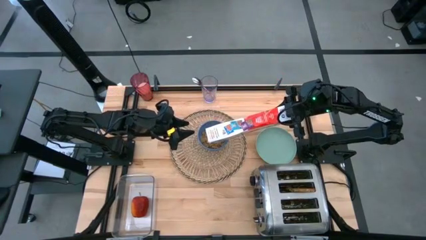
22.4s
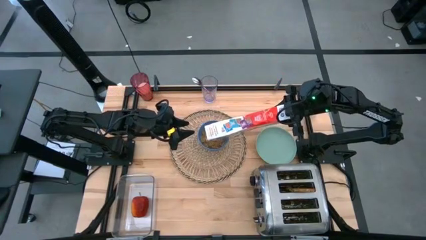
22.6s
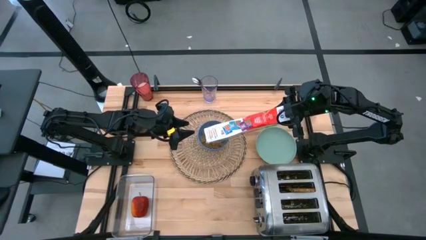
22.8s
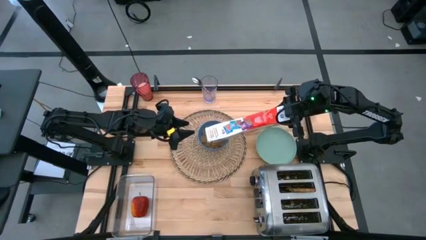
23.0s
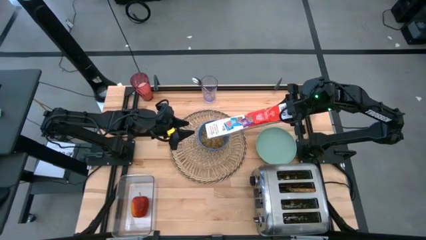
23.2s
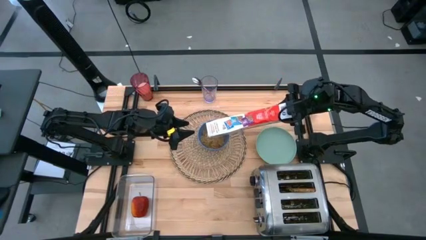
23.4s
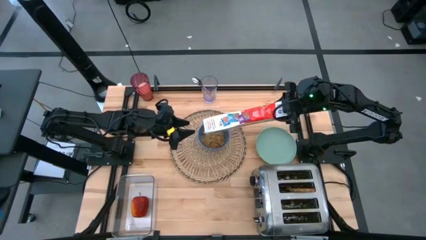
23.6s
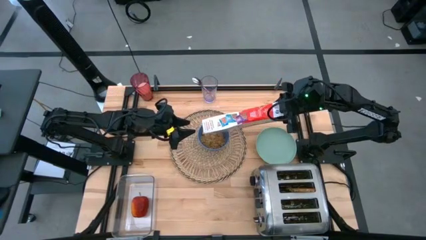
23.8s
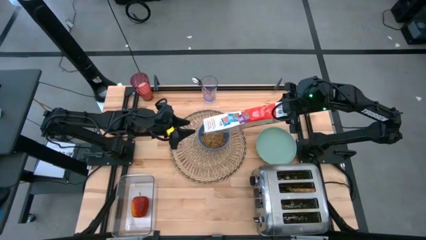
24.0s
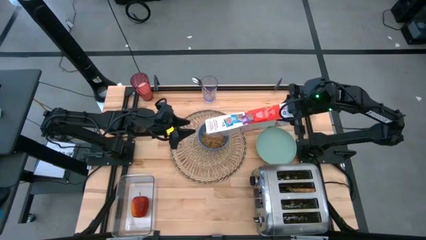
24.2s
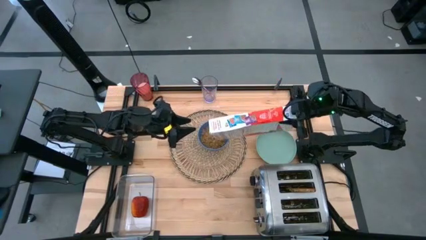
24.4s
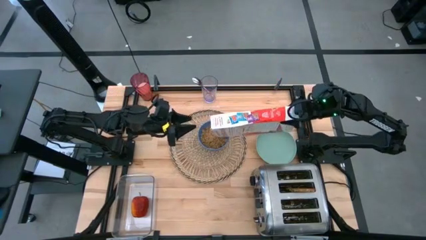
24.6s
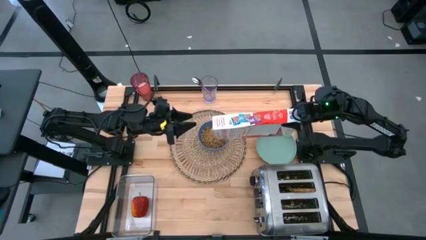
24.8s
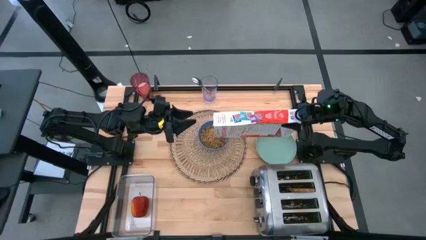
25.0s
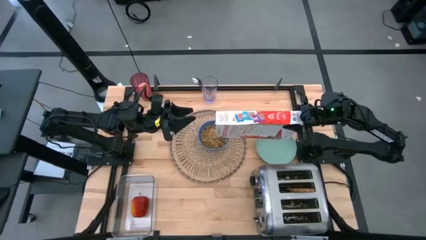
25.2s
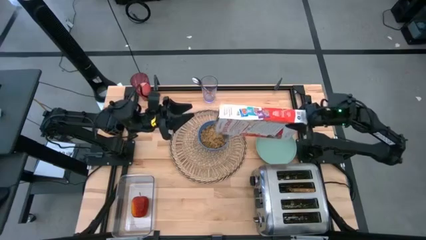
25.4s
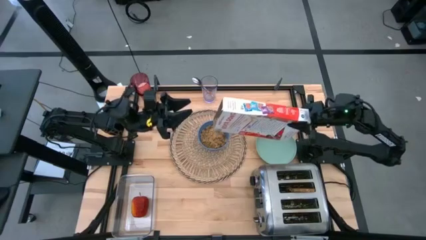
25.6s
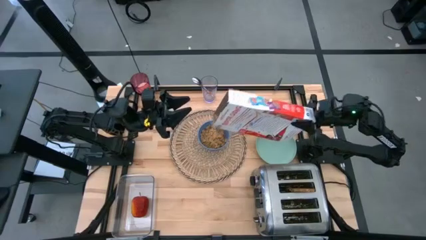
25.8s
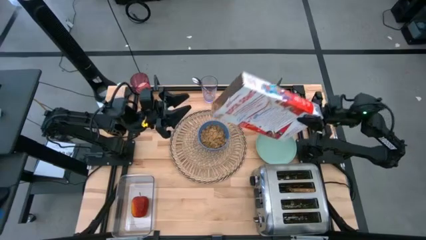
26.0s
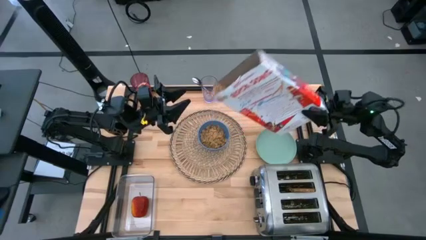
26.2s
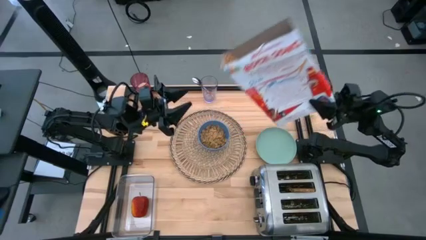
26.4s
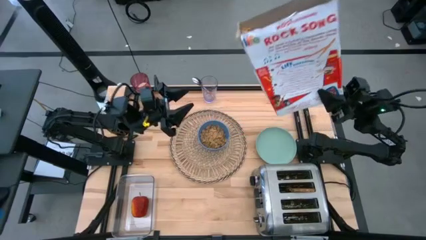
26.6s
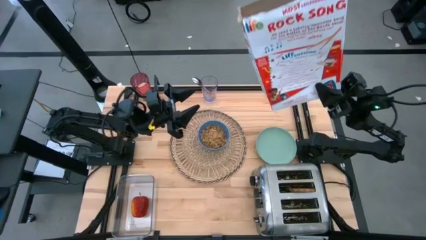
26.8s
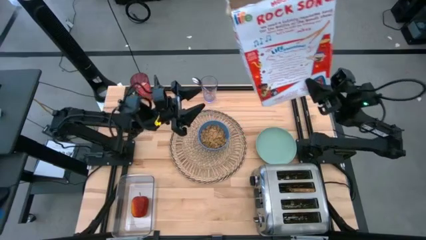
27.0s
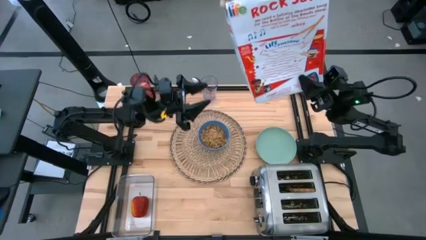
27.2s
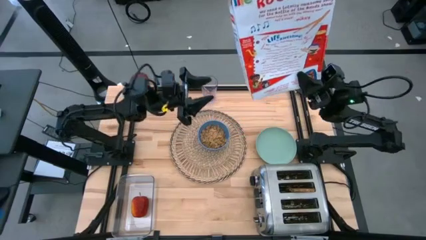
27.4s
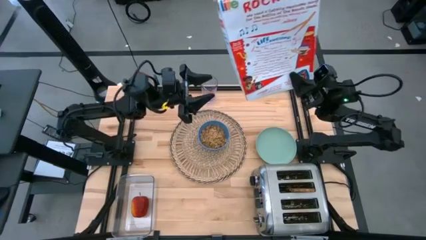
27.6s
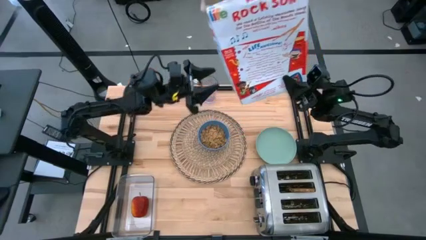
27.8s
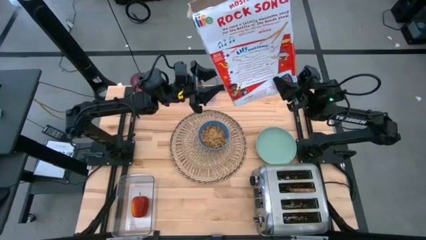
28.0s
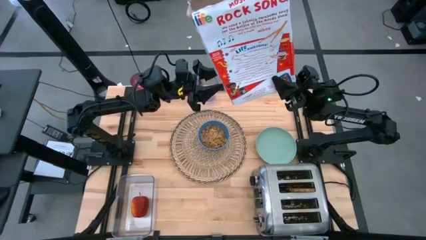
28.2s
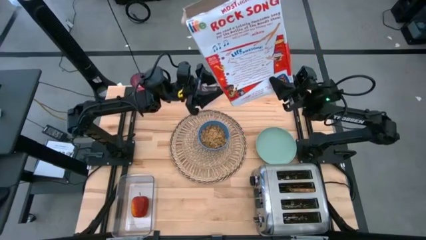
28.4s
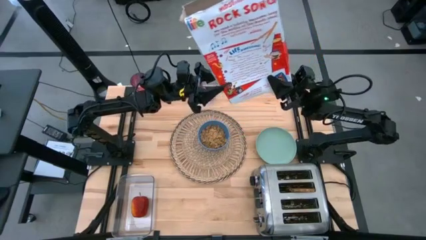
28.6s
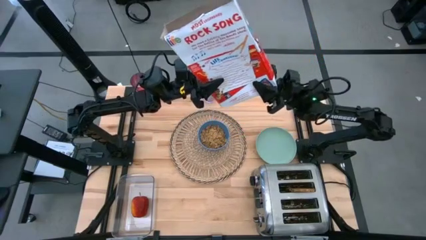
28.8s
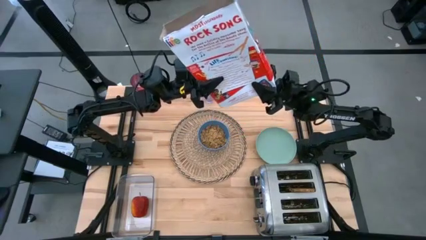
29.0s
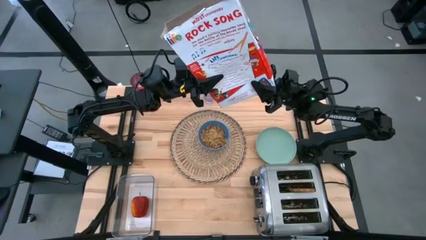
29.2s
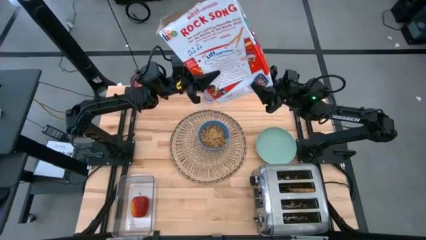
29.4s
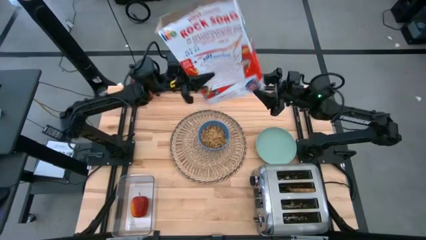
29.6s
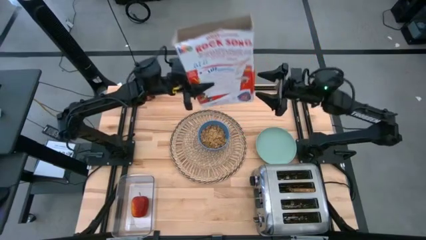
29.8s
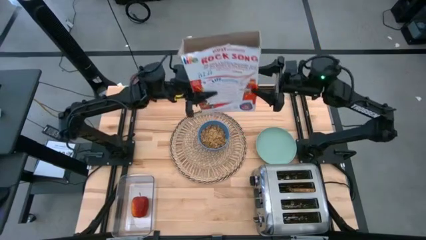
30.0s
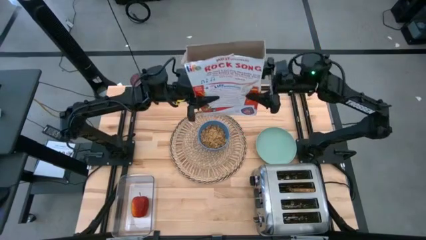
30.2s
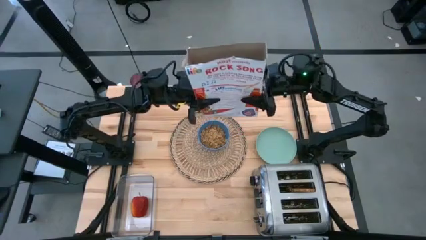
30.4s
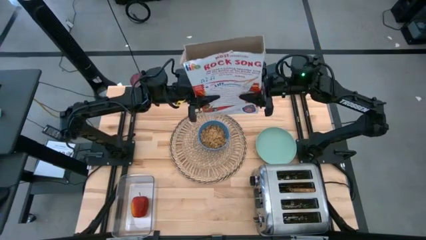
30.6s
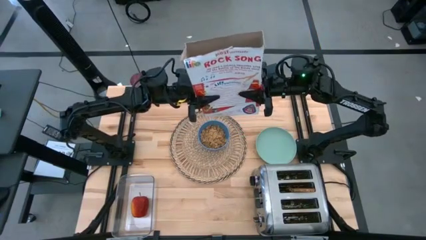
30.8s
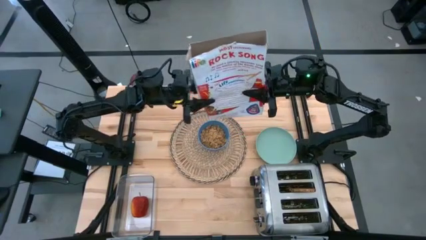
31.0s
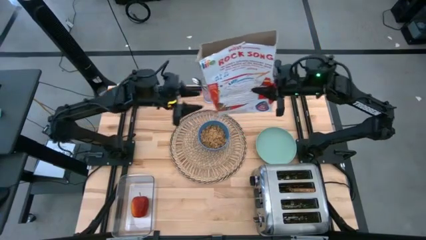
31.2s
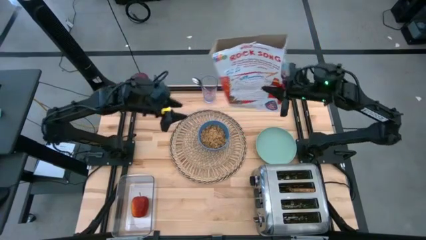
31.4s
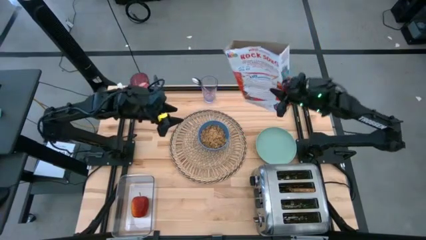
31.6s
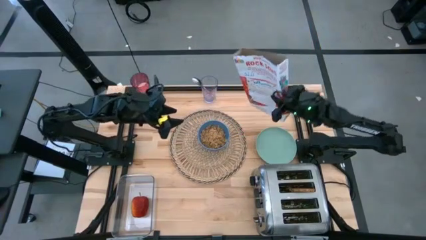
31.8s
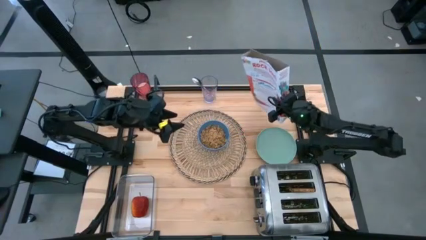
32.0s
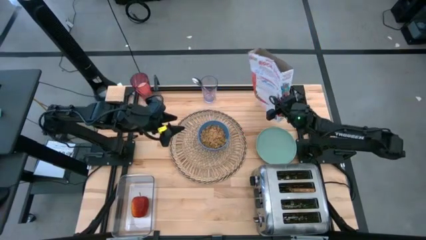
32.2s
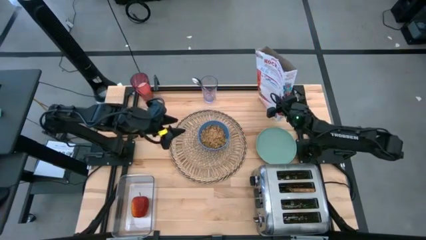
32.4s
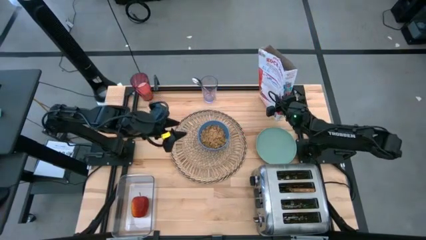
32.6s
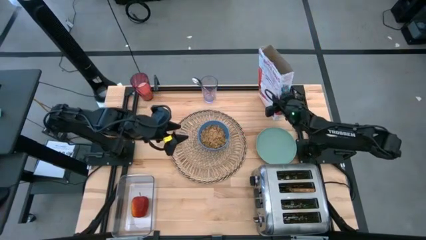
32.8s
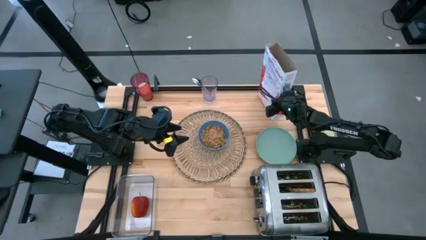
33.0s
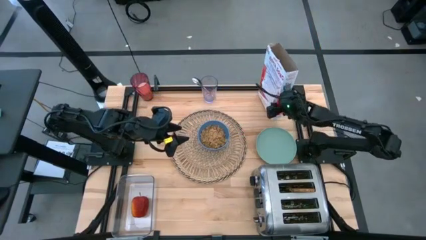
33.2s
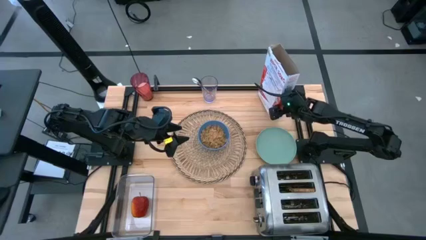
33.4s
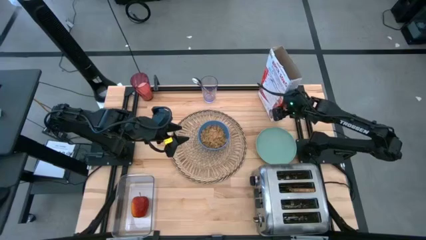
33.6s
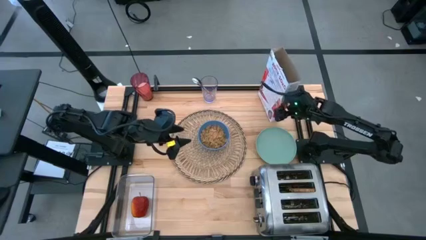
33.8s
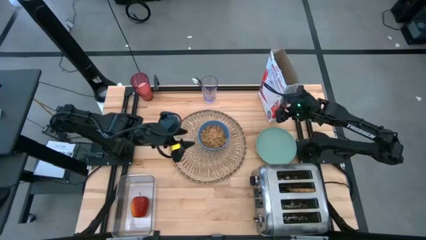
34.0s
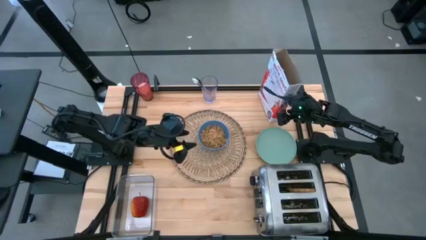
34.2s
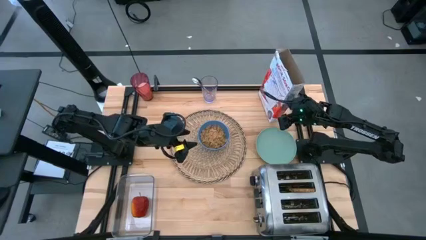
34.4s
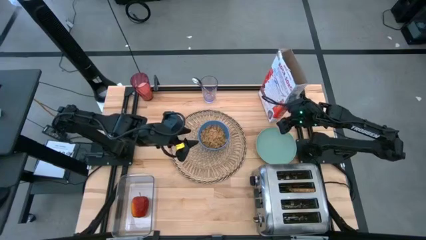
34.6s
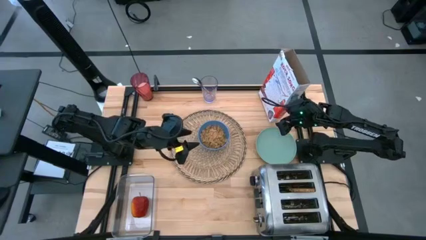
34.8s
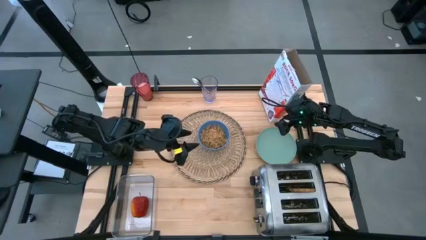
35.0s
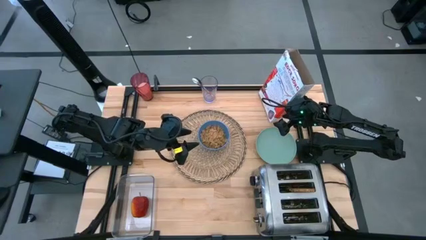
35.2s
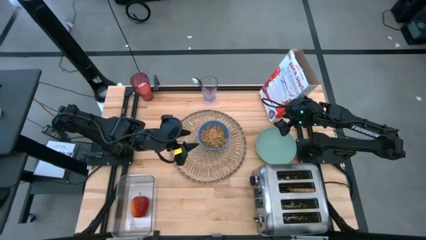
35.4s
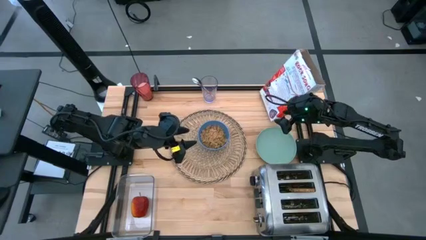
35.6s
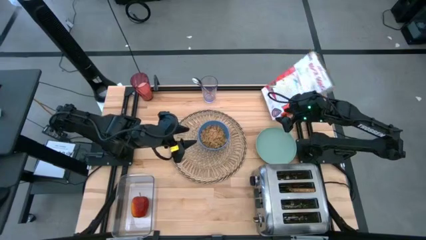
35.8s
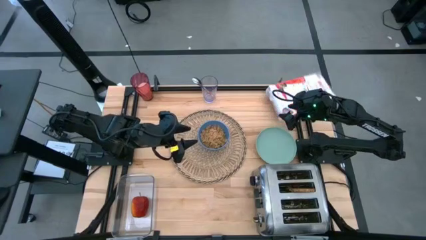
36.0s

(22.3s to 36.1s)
Task: Arrange a breakfast setting
Pour the cereal from the white cereal box into the blue bowl

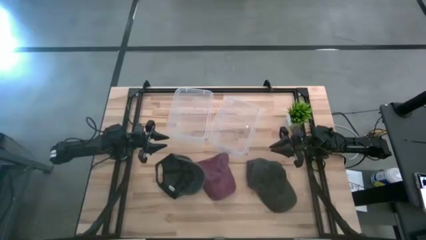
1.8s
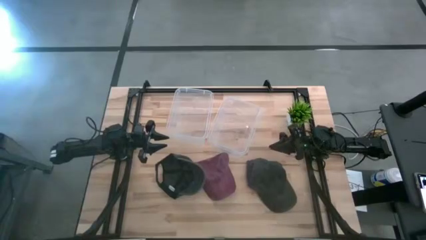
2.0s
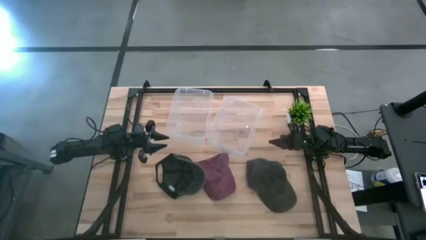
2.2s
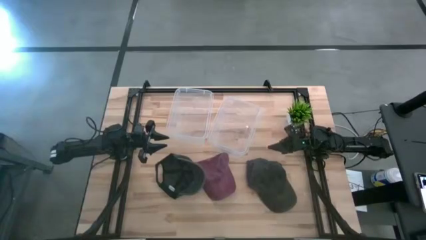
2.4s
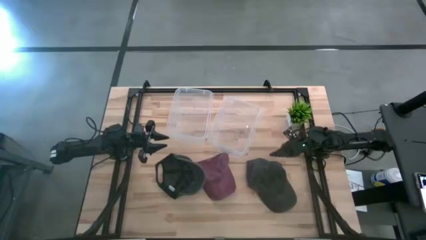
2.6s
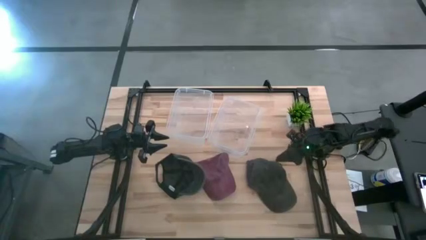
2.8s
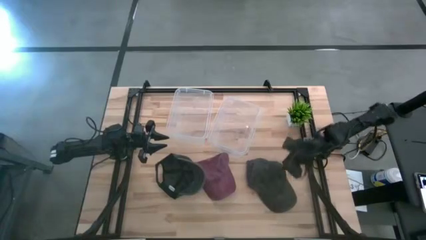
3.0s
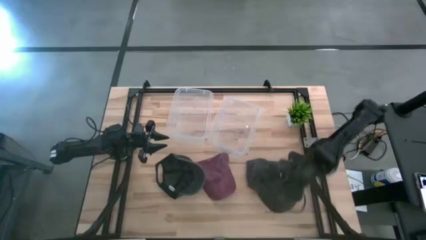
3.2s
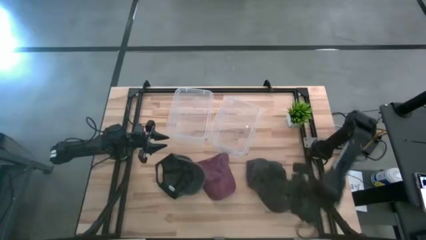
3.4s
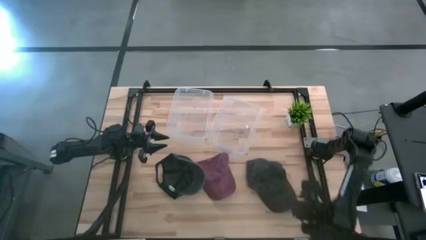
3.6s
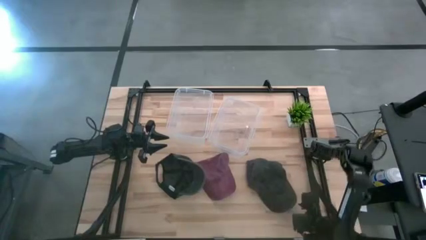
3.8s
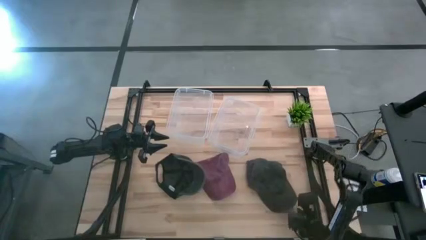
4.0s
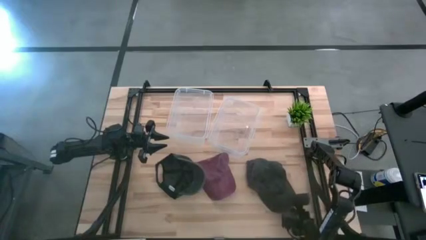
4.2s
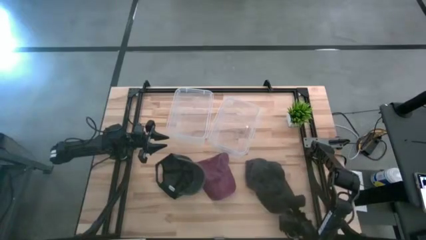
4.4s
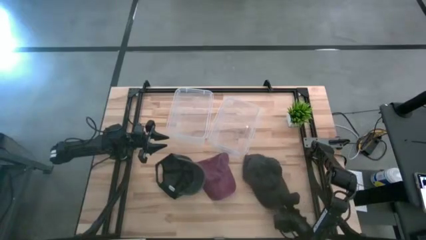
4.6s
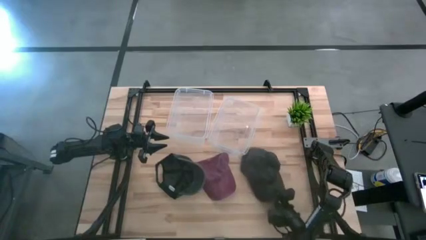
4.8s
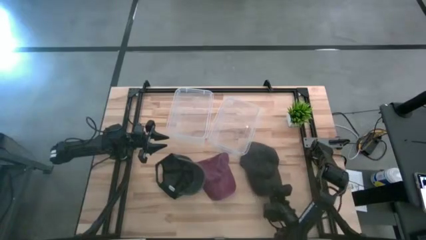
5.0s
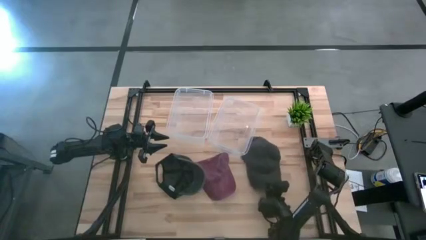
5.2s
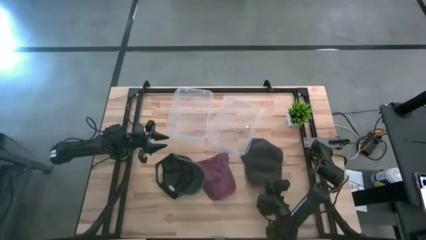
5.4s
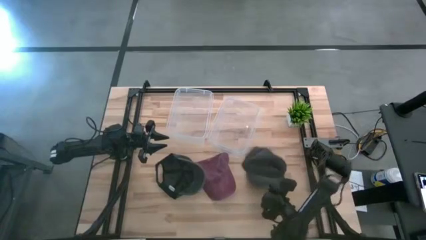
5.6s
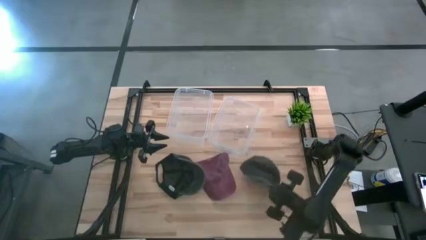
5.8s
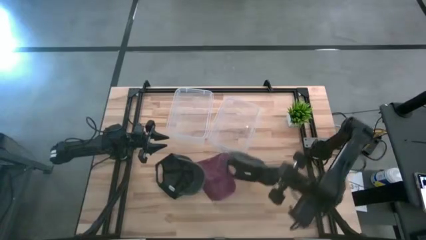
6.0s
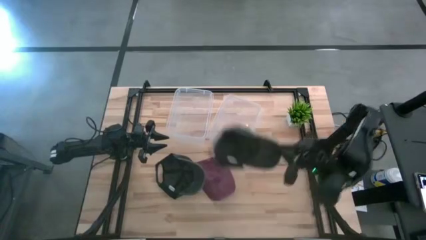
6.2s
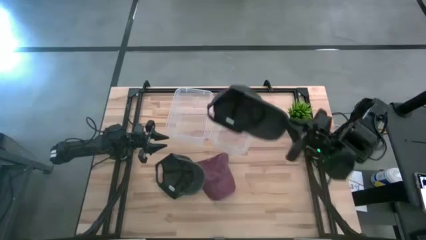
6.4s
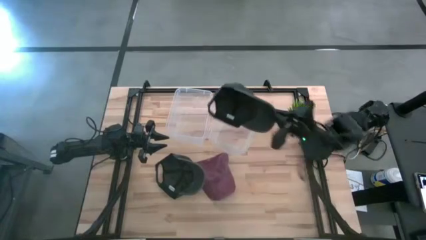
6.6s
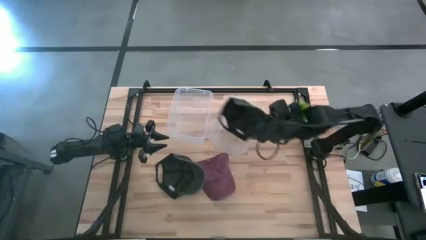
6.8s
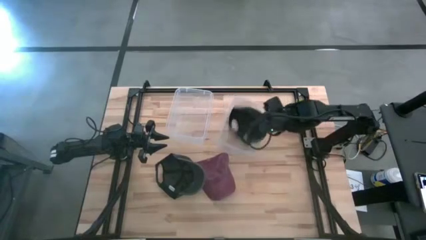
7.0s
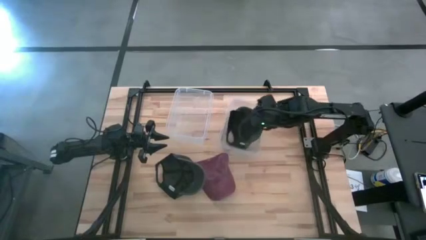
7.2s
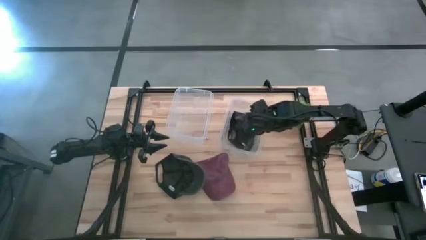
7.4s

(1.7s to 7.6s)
Task: Pick and place caps into container
Put the right black cap into the right transparent container
